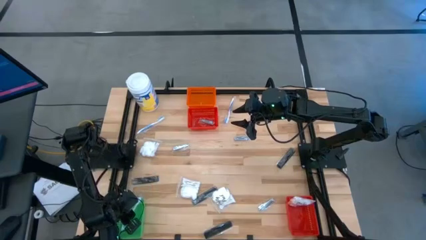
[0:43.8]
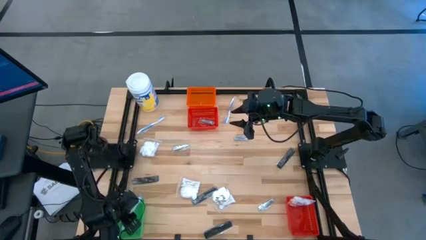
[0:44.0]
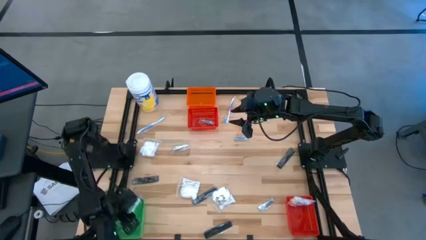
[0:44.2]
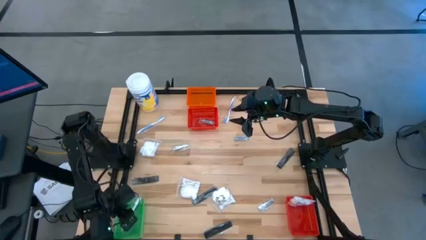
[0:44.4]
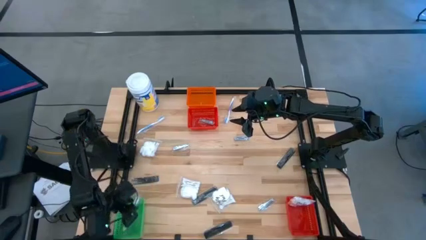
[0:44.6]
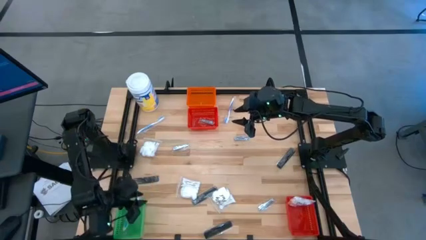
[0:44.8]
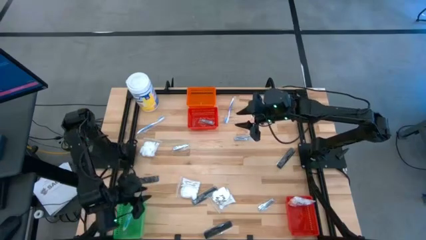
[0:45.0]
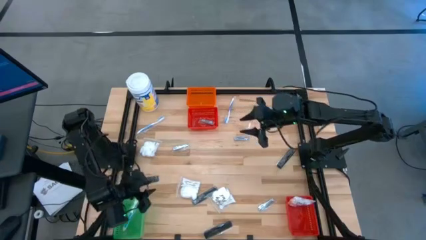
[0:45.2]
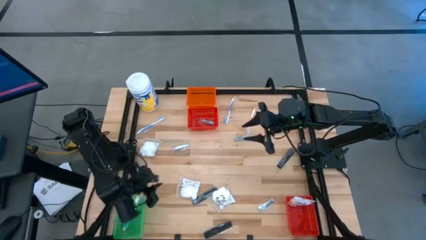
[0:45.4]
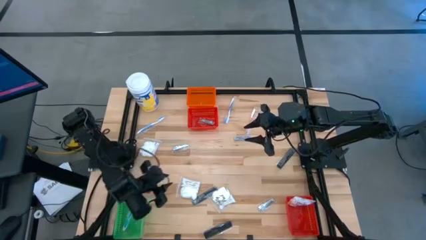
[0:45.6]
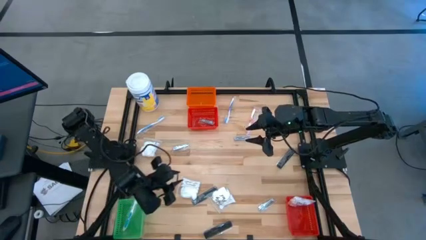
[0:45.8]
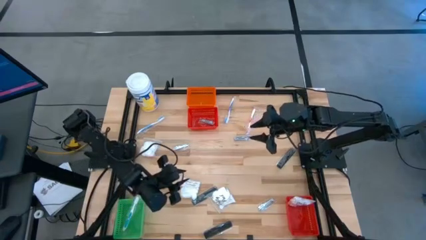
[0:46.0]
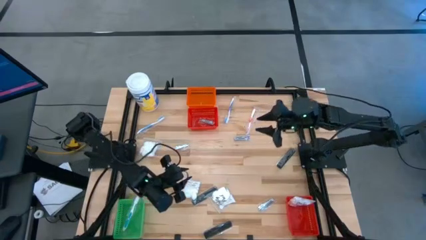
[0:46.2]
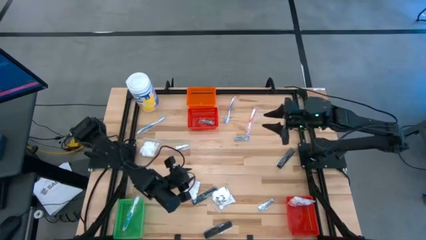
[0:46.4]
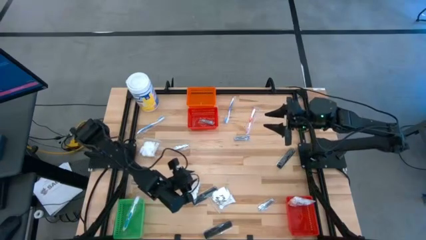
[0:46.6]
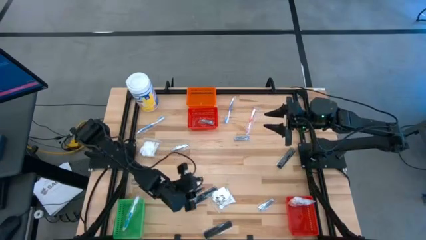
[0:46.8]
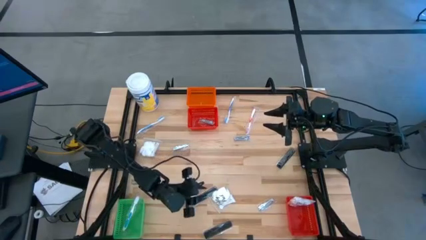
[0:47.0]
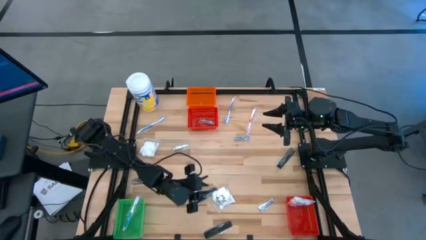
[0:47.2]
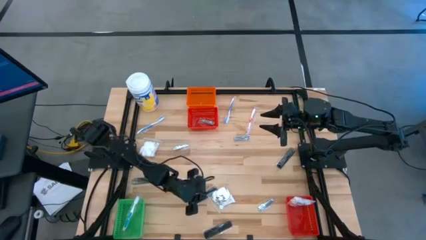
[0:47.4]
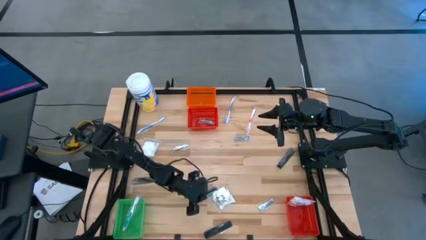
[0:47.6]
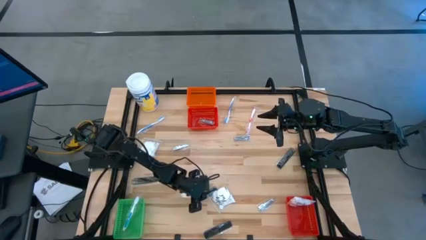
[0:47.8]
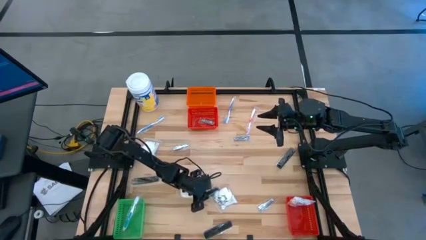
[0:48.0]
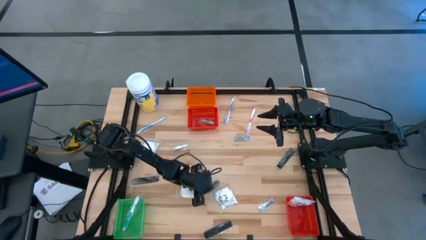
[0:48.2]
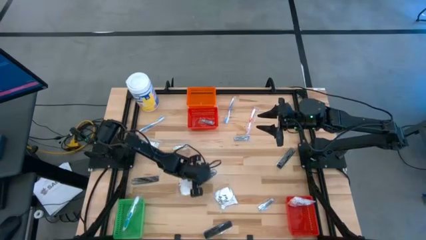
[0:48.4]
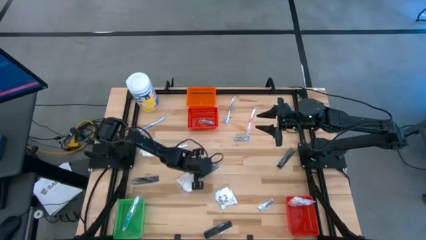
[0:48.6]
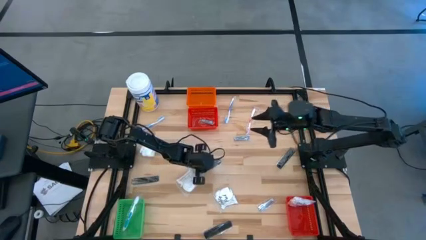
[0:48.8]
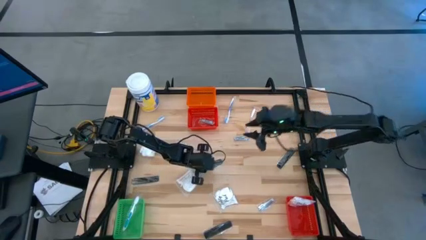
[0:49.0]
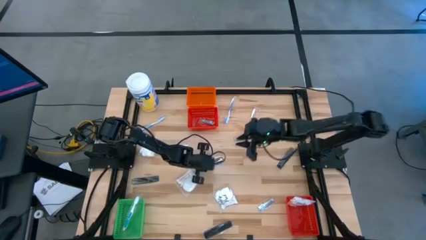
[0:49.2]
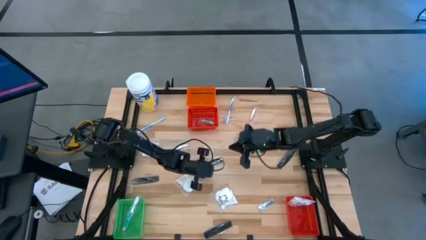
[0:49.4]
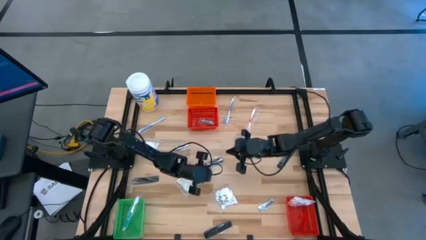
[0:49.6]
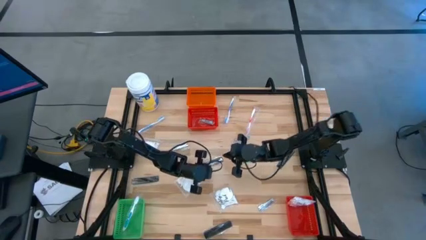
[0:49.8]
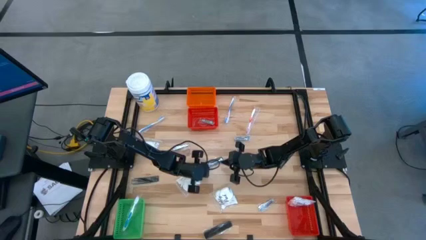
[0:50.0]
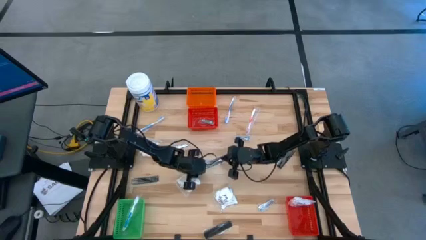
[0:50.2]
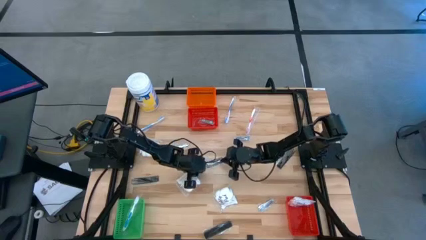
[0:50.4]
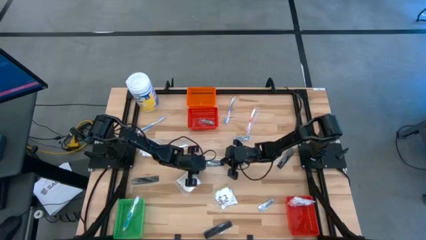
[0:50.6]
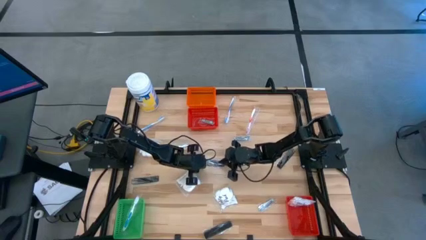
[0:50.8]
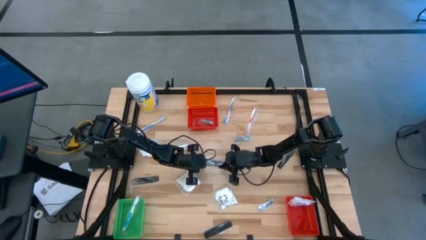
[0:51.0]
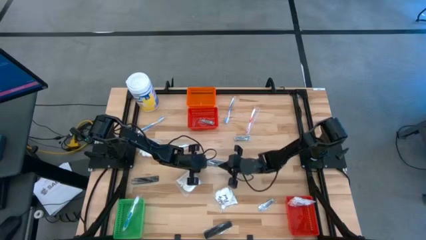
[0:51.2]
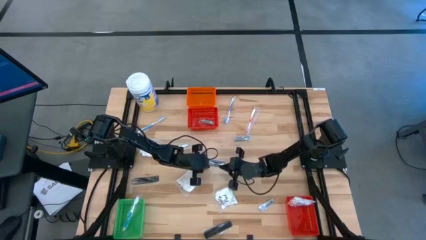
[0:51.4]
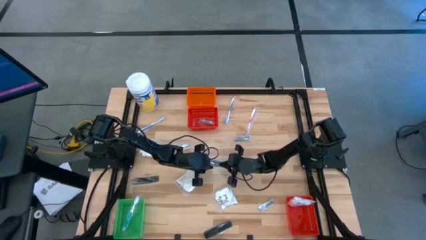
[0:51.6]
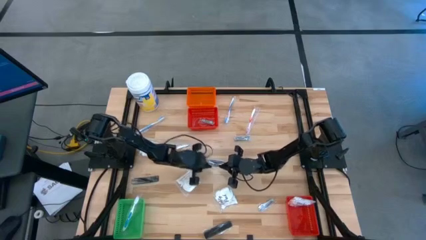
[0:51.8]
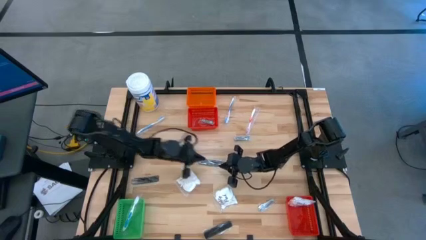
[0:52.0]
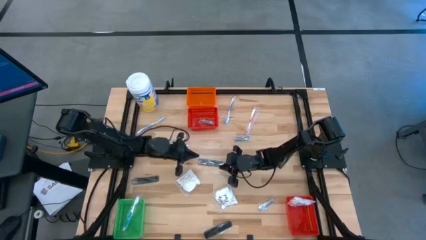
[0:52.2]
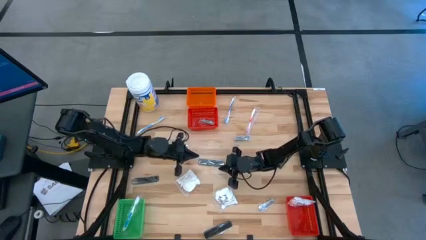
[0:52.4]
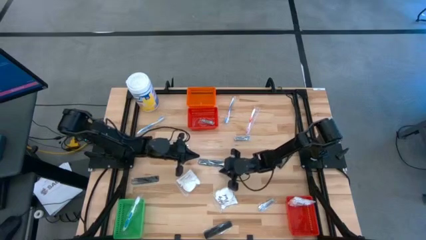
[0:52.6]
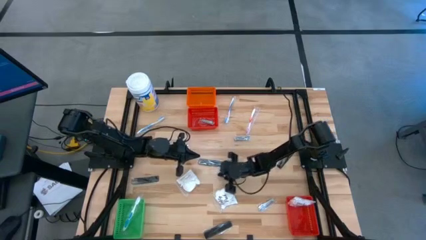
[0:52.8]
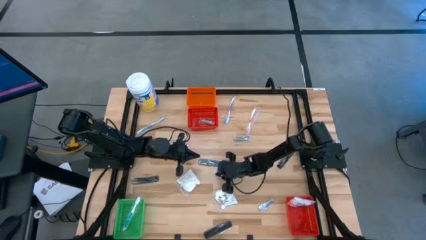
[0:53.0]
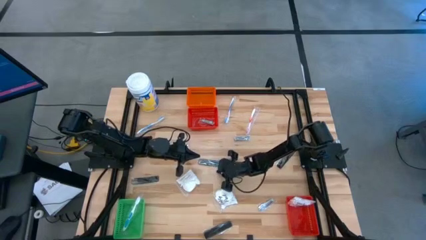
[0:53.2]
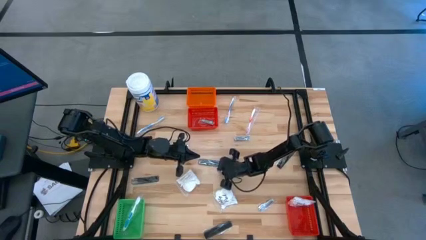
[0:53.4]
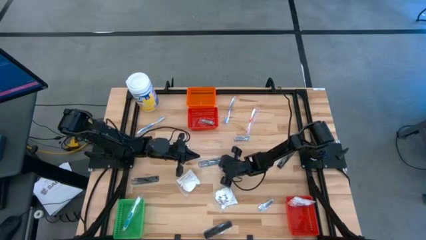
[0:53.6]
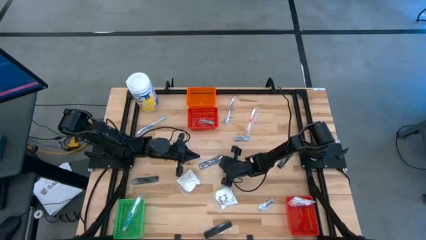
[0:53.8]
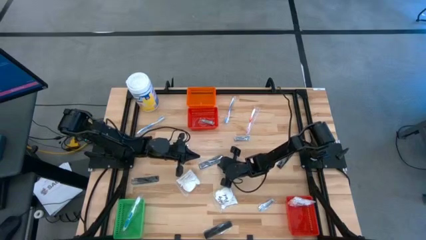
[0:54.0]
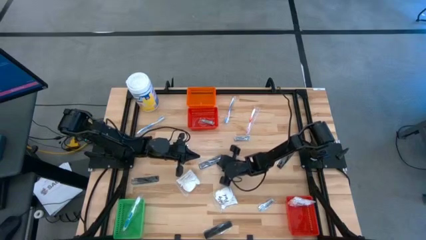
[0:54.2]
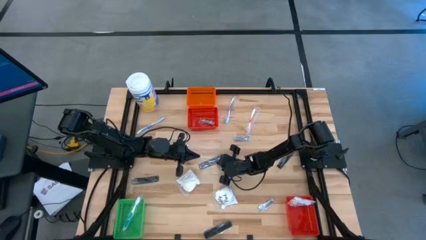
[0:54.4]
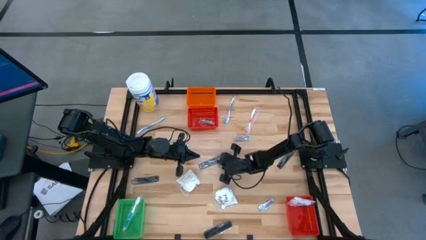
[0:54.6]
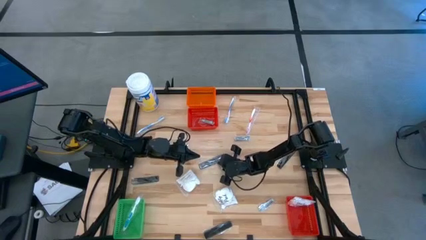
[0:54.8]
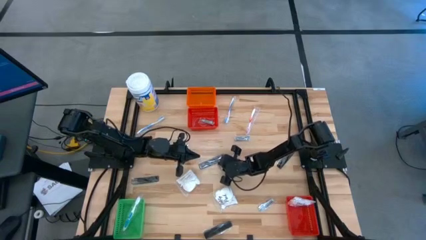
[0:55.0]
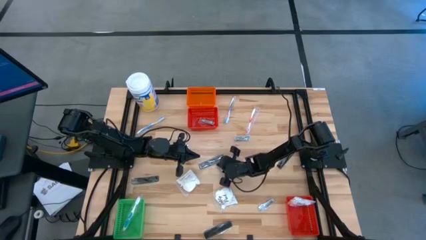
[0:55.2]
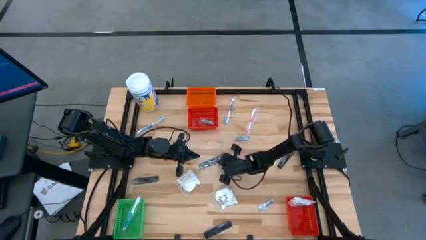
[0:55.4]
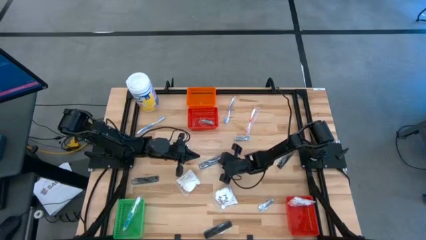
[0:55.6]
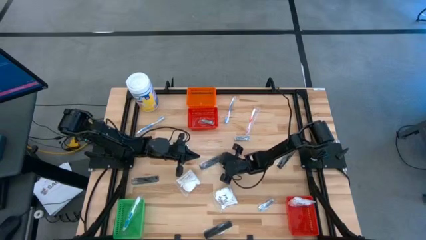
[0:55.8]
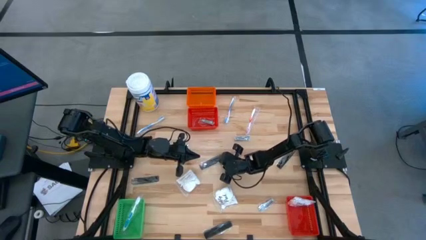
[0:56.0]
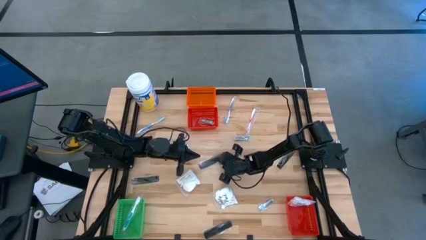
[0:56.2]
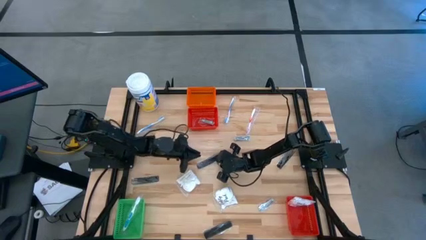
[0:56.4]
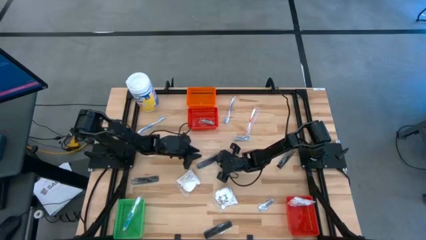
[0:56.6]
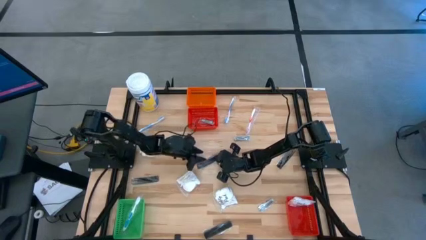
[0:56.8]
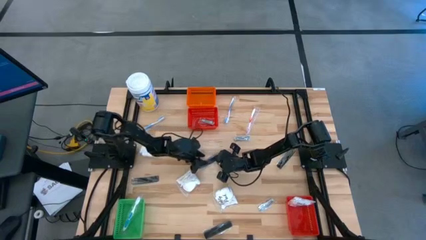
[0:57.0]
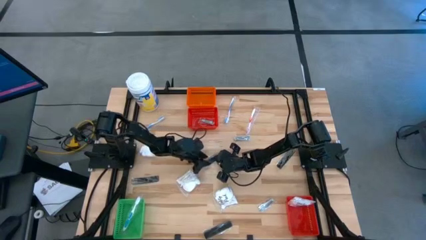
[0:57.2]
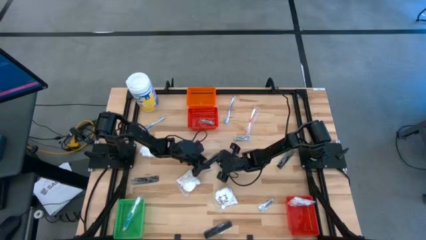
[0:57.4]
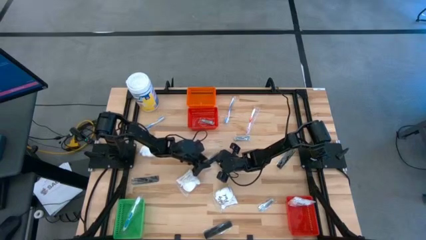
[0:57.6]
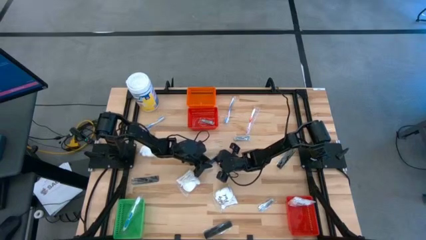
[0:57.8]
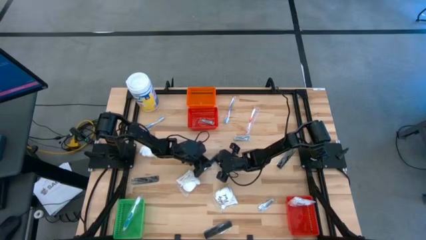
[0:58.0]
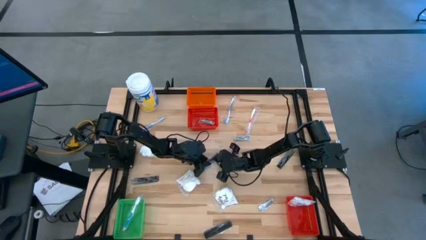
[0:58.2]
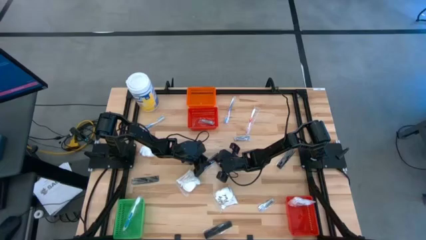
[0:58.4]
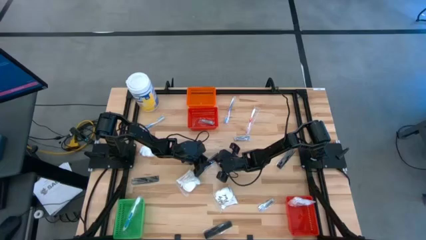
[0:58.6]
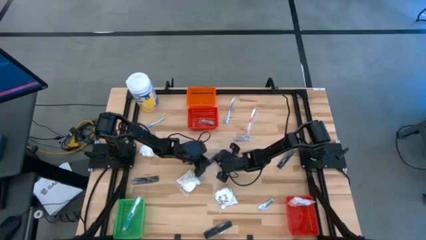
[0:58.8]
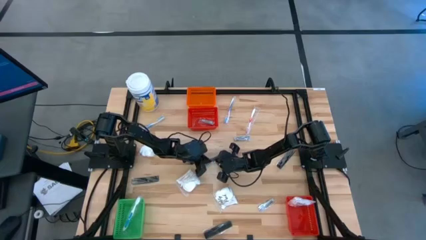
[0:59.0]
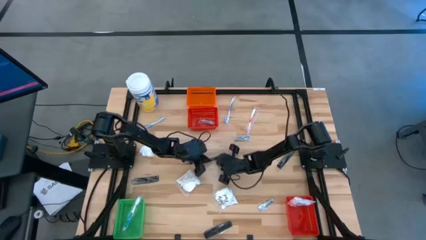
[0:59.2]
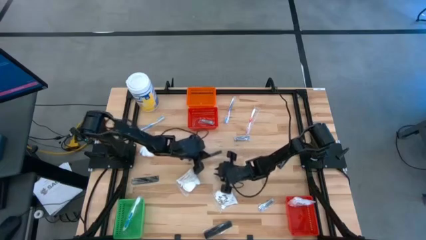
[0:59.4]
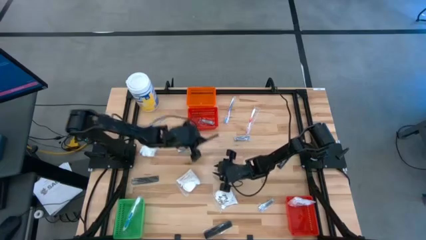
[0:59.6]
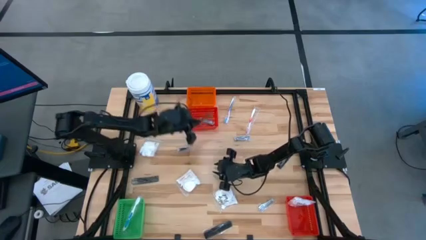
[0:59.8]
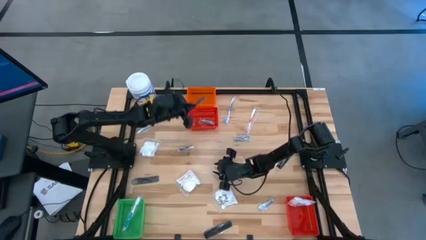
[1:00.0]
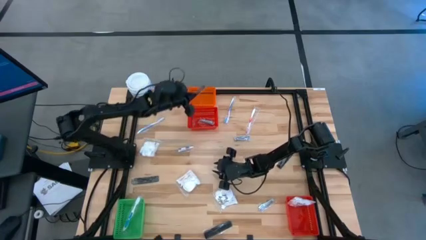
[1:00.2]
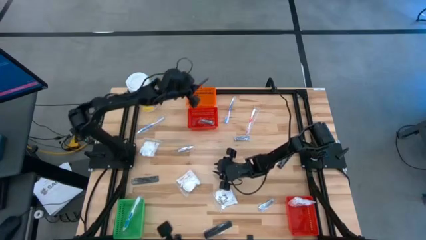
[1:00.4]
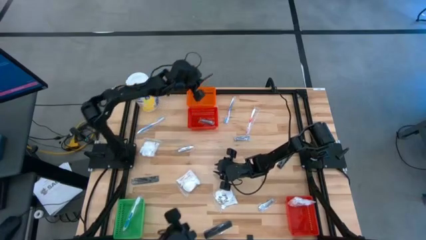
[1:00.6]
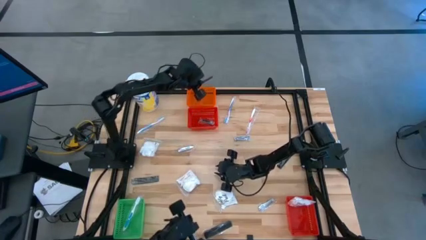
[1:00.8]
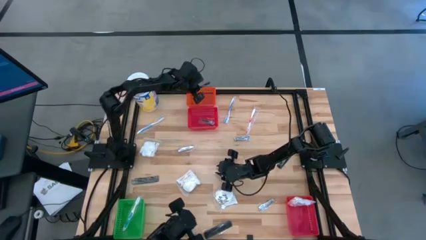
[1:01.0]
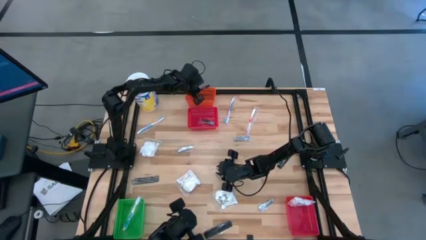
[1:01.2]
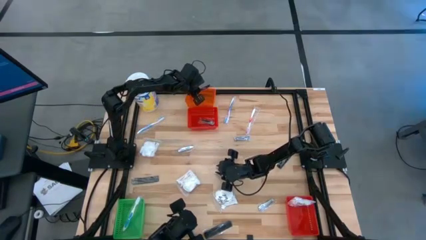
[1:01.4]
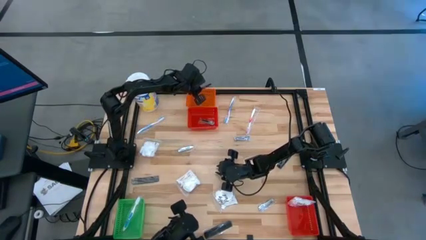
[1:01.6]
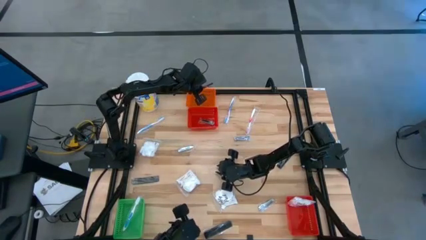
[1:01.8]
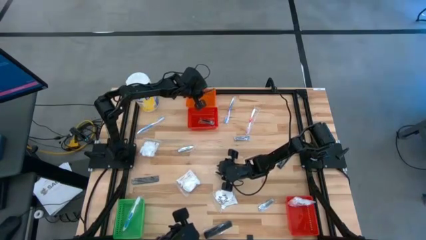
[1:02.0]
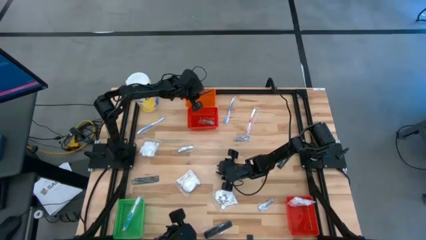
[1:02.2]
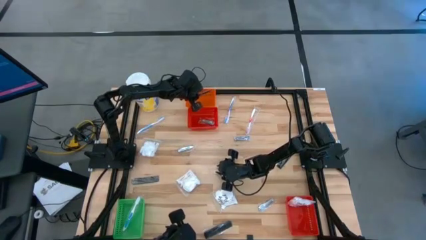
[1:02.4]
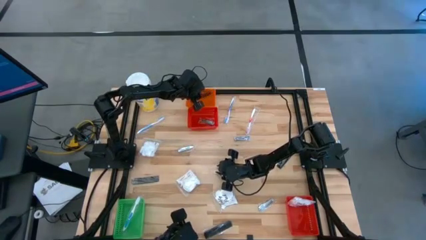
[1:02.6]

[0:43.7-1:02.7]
Task: Pick & Place Travel size toiletries
Put the comb into the orange basket
